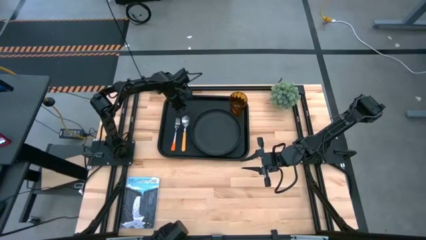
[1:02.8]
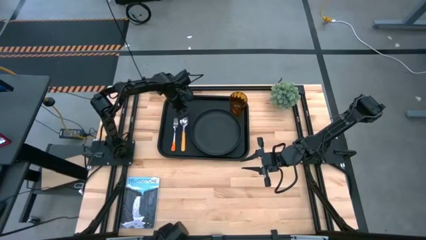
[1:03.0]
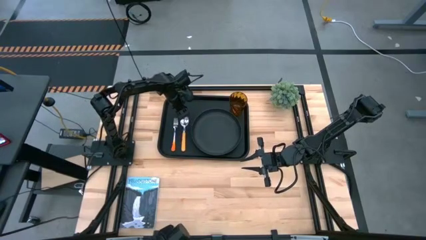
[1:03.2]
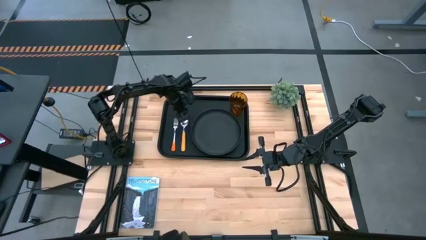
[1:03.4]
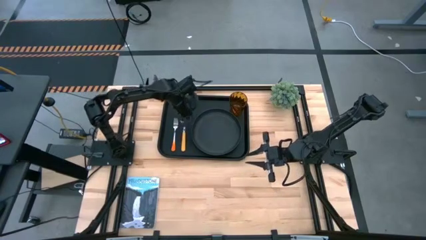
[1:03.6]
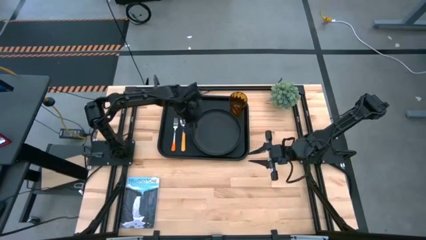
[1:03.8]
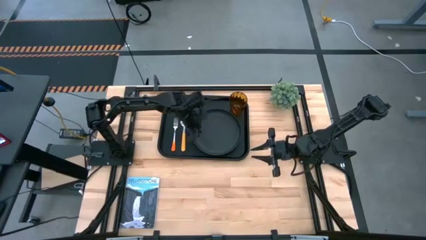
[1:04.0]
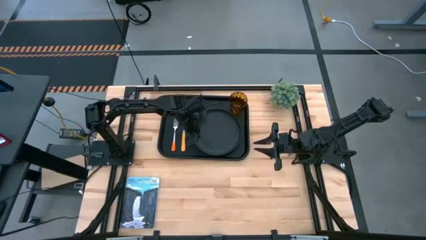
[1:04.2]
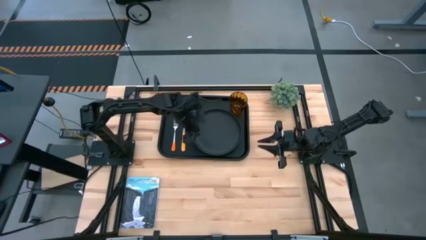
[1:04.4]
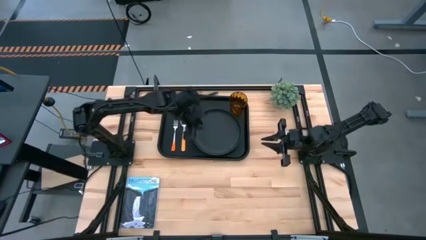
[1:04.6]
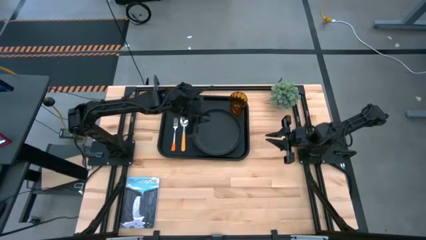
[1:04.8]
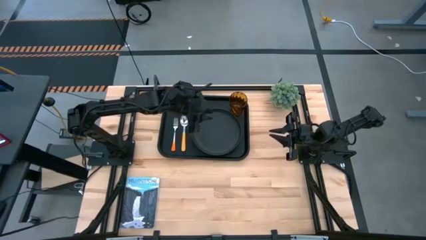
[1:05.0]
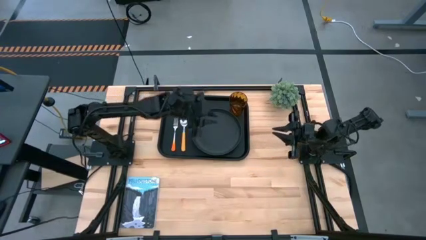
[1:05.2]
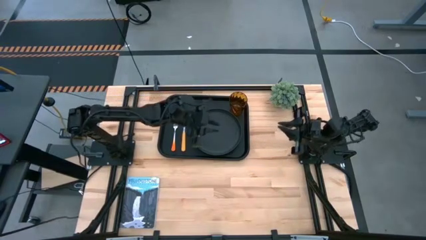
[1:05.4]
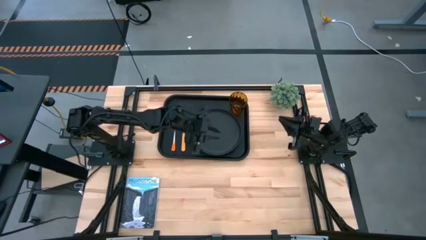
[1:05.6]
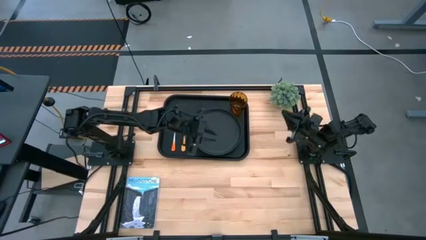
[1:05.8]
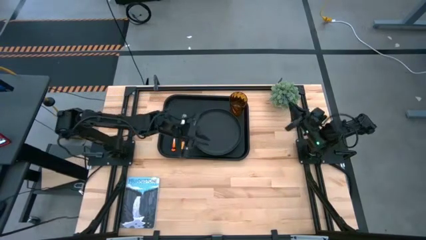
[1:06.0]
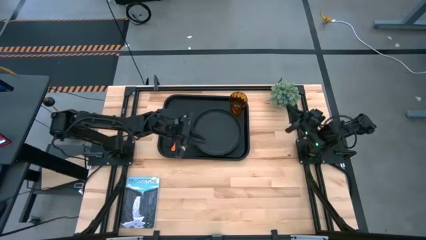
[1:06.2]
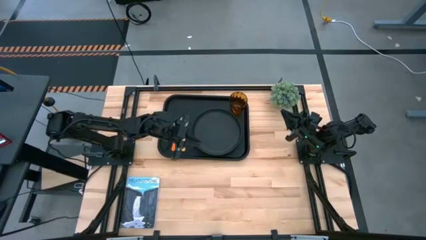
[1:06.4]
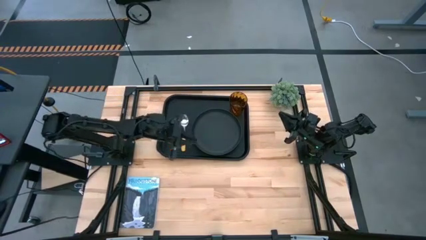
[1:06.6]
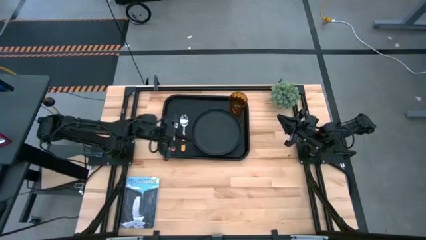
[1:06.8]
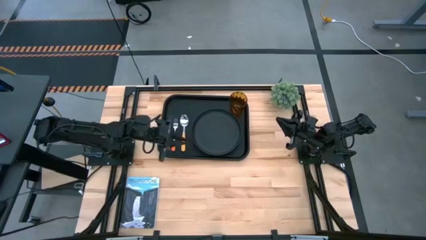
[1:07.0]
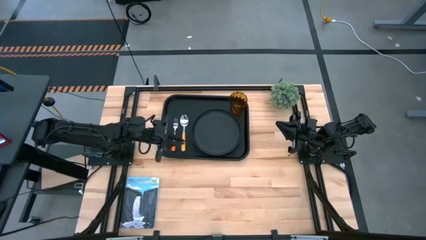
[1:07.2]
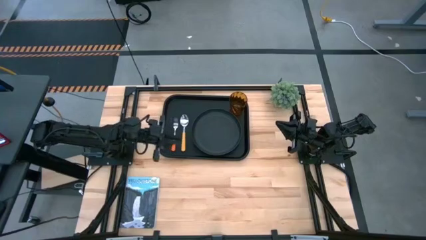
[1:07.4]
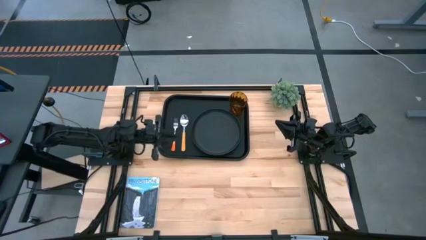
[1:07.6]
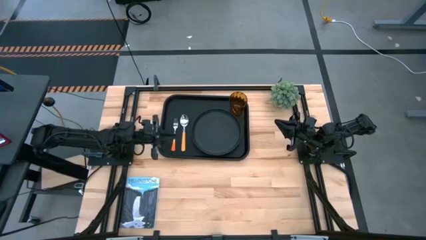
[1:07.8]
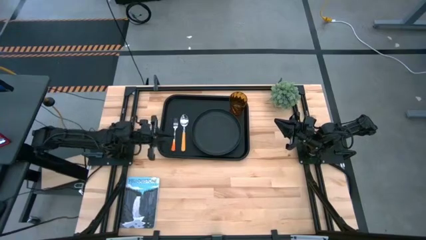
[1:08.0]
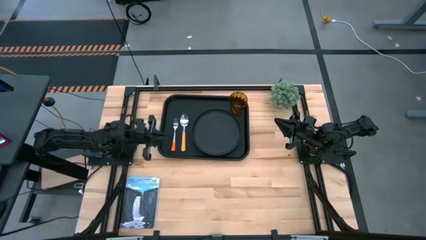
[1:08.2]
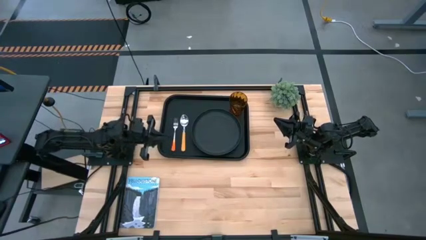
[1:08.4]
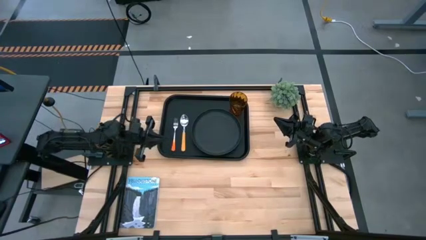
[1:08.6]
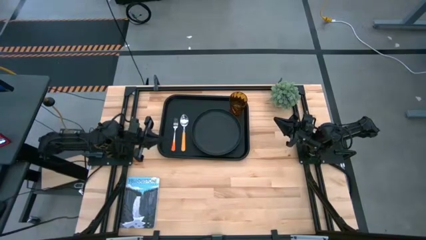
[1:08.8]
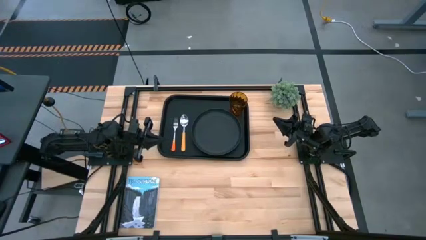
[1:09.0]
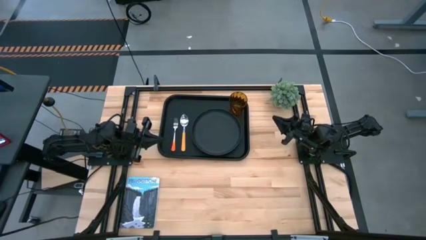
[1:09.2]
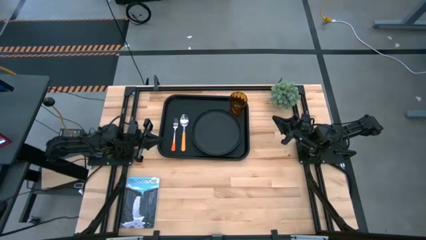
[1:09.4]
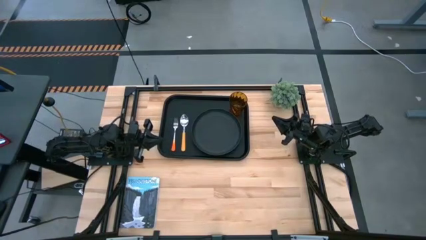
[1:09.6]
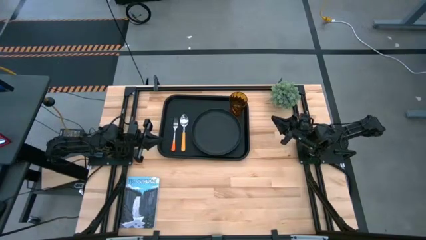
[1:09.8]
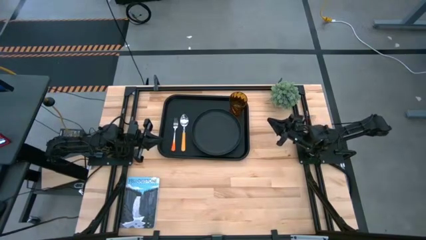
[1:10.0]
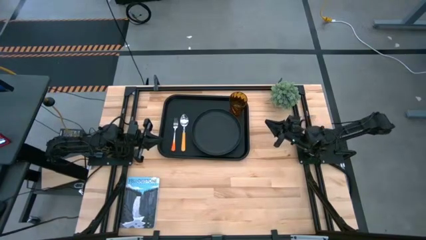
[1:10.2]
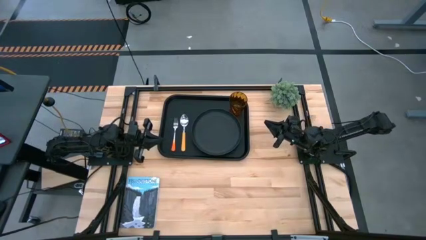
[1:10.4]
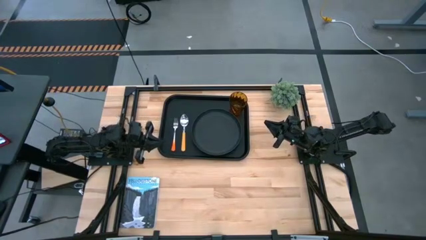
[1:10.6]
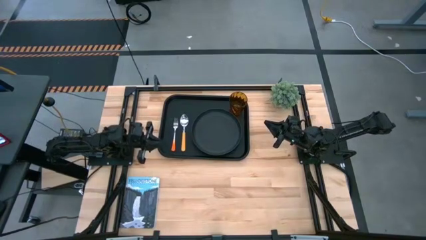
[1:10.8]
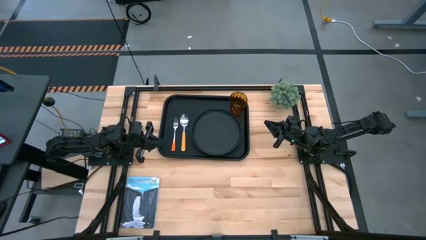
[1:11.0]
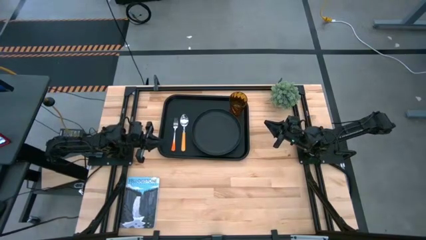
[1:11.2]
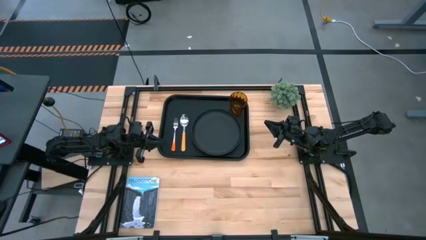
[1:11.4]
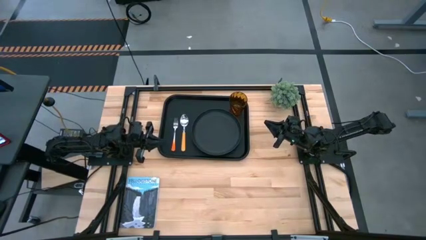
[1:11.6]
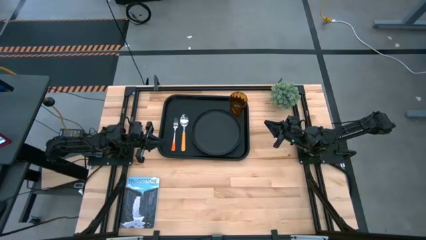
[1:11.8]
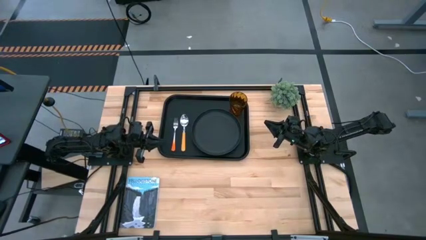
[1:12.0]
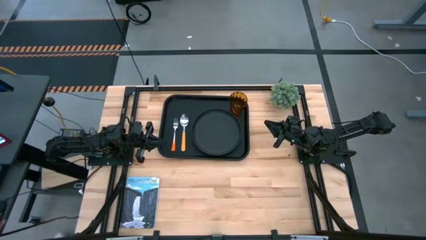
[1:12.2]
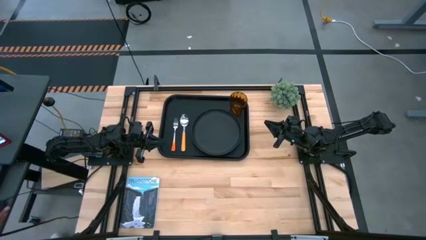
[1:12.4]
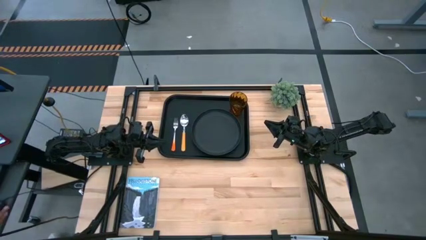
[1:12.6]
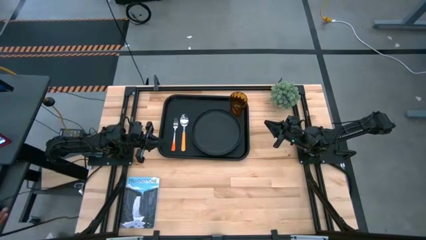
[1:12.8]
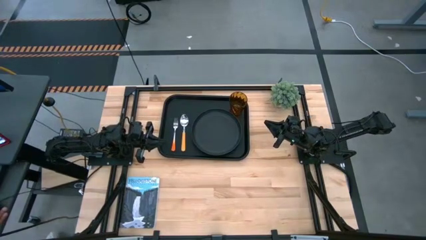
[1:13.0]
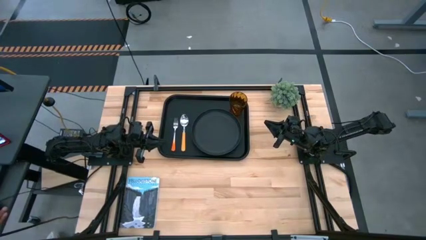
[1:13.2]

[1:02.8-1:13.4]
Task: Pick and place plate/cup/fork/spoon on tray
Return to Home Position

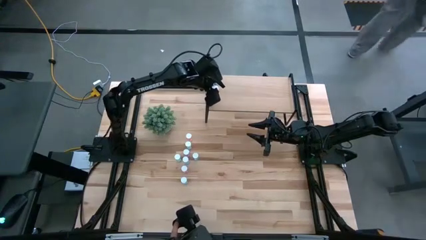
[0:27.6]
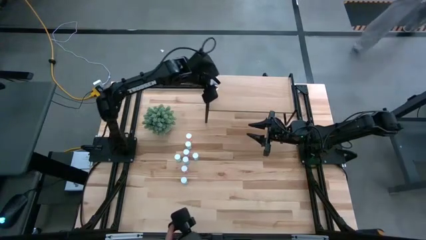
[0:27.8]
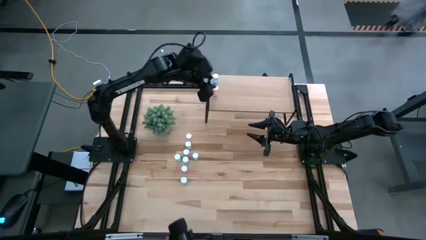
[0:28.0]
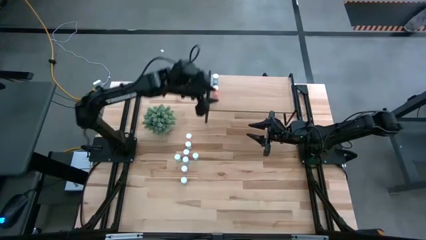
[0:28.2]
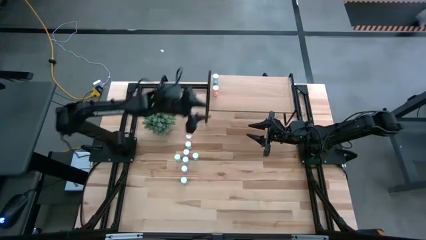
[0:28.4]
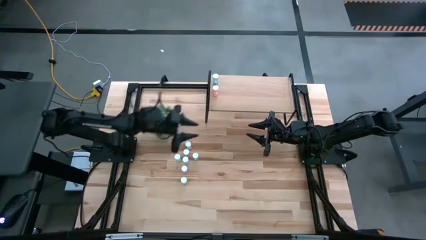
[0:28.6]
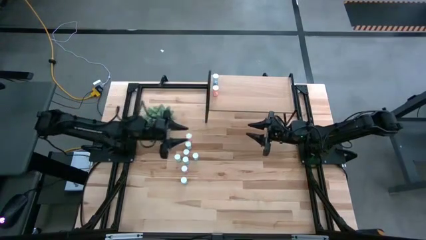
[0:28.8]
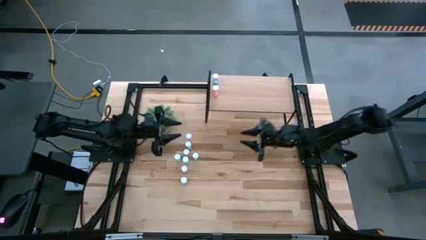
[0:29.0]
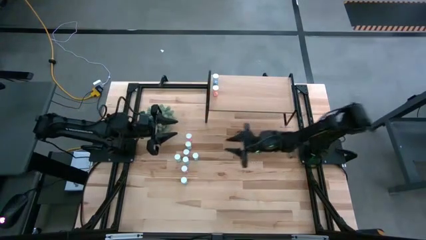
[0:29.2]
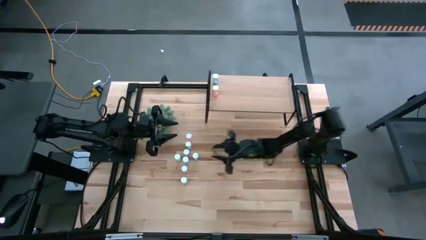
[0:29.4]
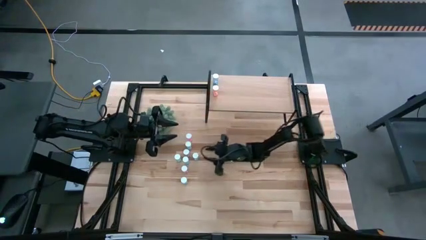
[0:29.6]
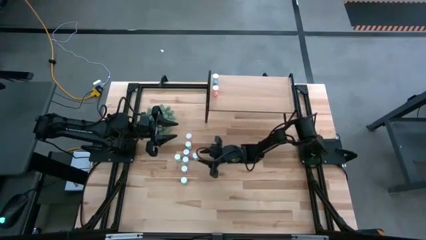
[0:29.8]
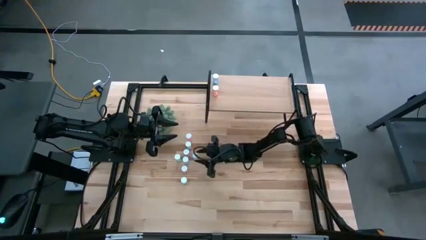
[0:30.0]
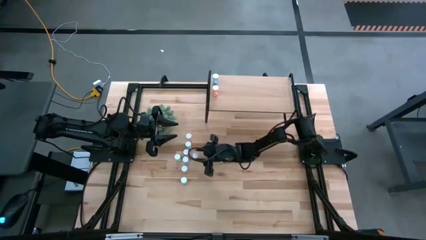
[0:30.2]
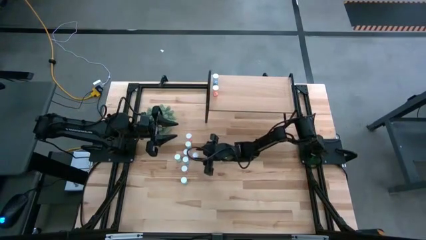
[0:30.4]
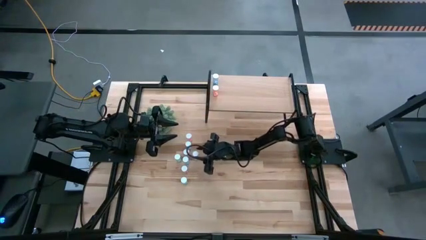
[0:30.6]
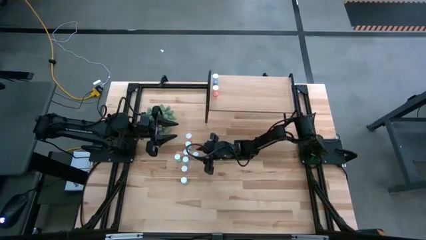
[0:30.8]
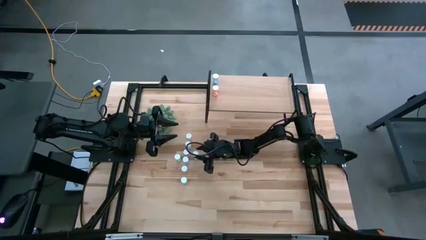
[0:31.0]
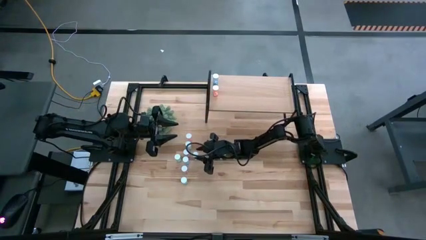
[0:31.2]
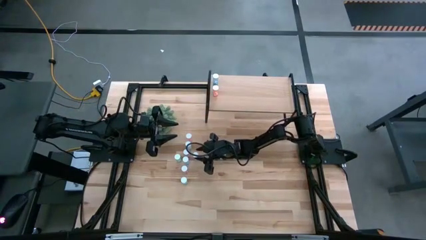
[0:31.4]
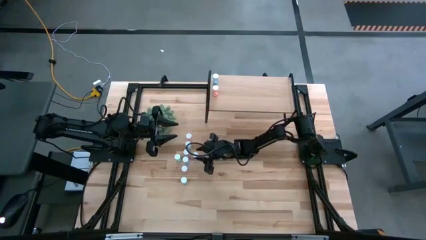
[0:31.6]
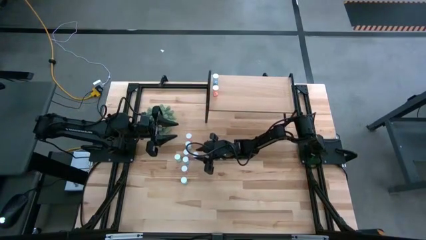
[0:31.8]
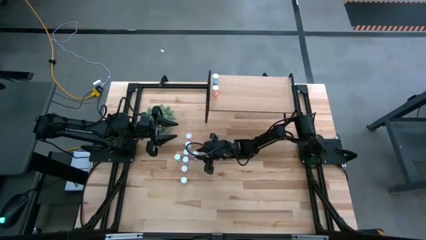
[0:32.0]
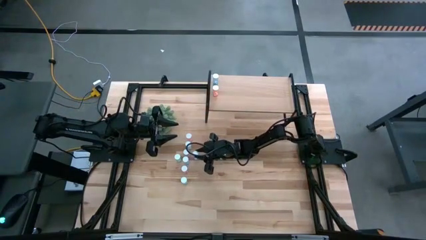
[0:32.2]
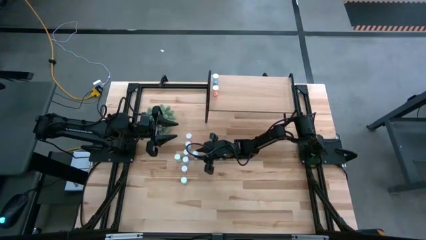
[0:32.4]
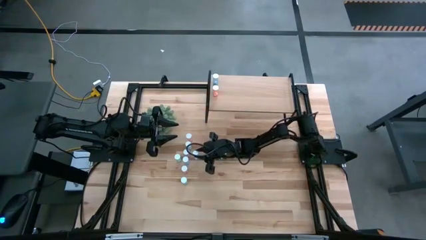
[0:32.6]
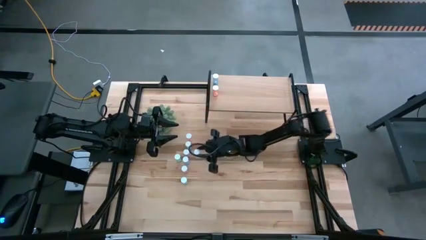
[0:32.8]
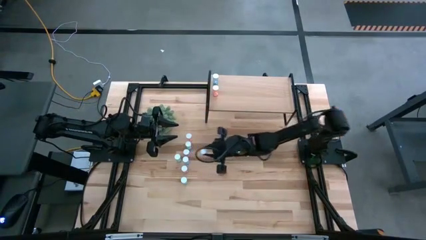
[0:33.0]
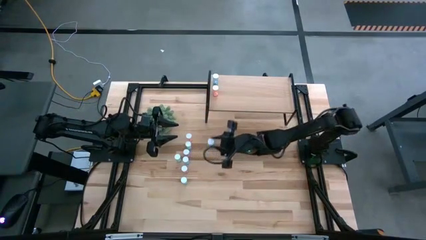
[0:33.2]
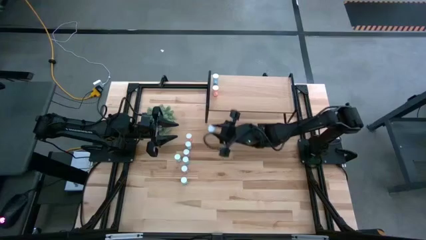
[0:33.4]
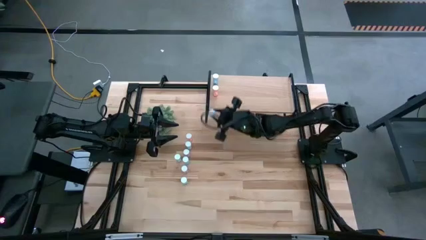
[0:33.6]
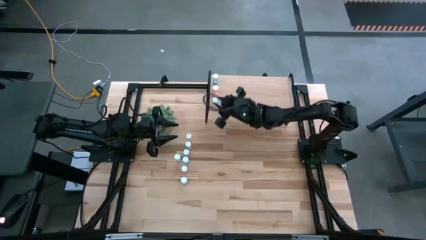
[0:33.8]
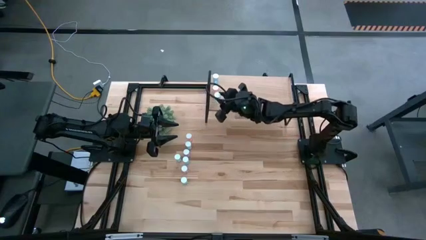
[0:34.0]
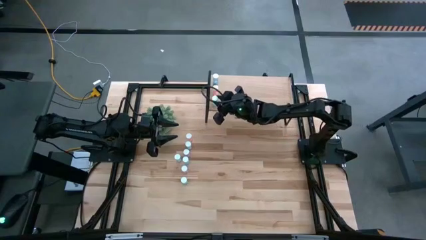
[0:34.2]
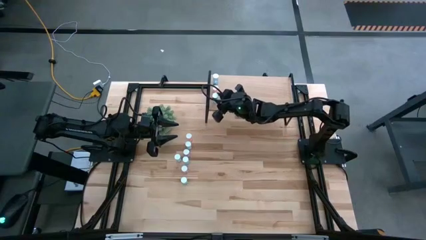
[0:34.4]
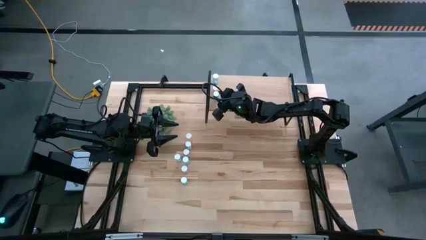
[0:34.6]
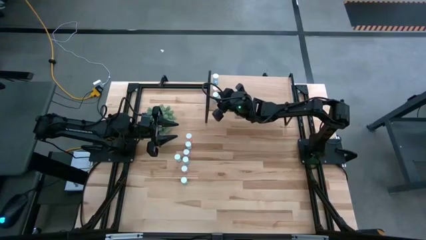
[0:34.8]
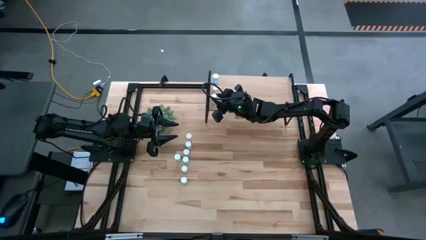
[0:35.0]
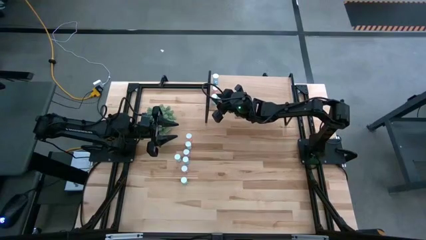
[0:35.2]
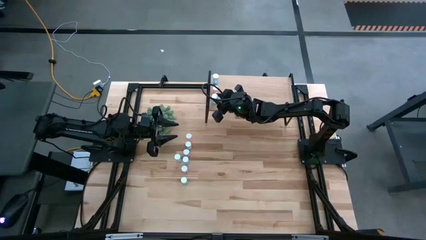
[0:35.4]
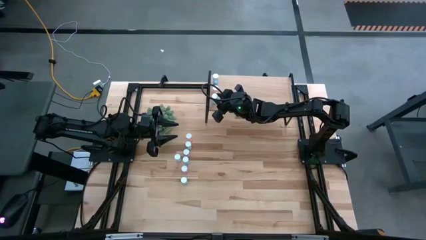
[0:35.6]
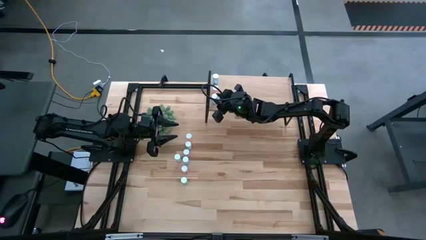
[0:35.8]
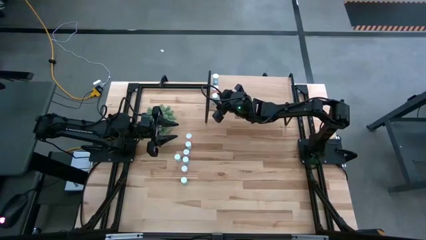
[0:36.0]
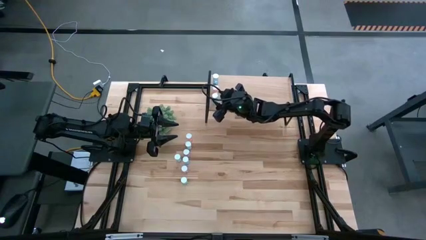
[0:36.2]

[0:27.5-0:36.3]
Task: Pick and place medicine bottles onto shelf by color
Put the transparent green medicine bottle on the shelf
